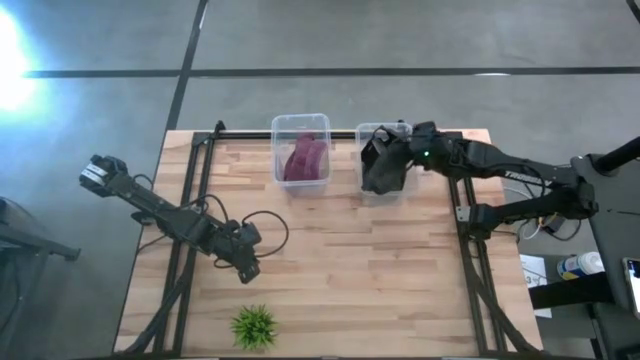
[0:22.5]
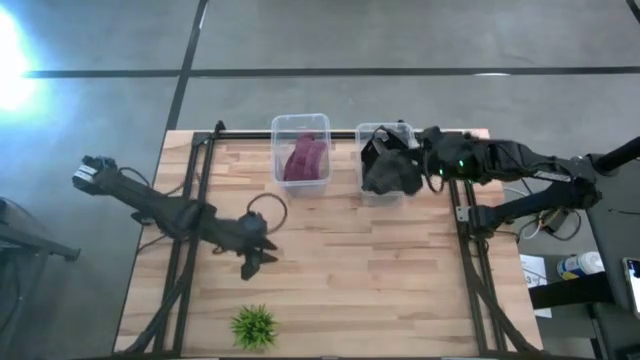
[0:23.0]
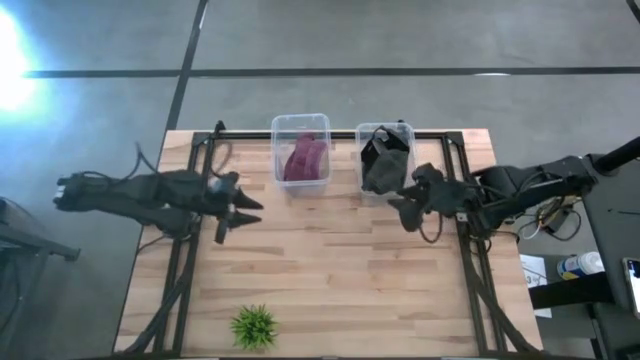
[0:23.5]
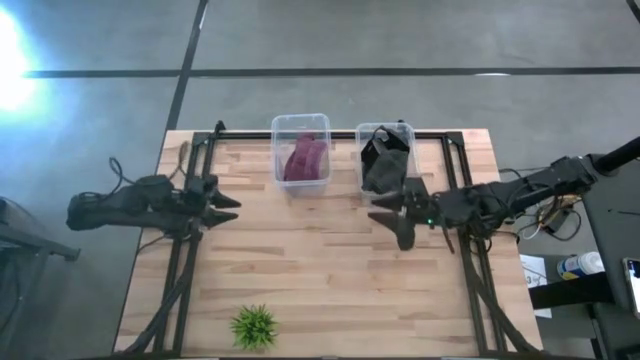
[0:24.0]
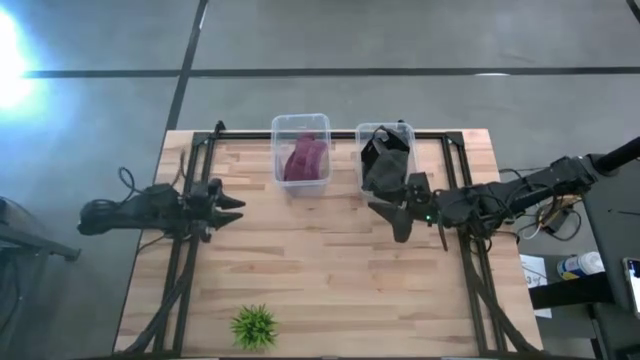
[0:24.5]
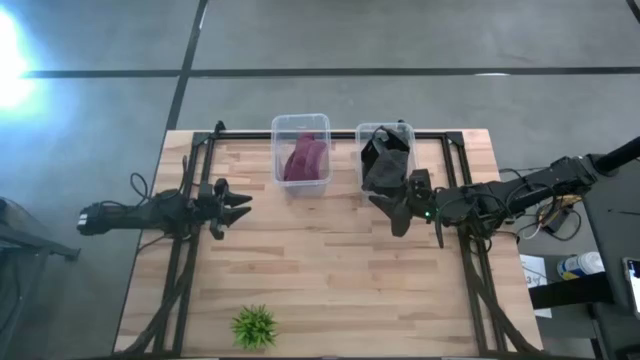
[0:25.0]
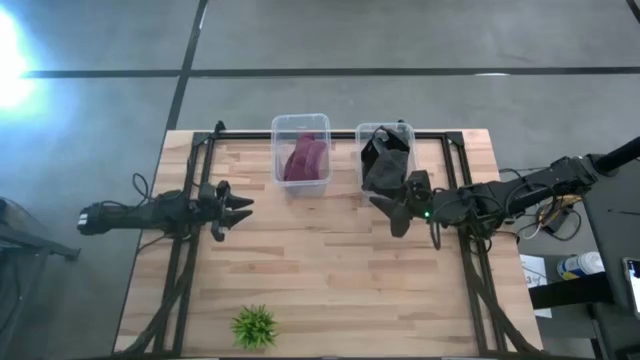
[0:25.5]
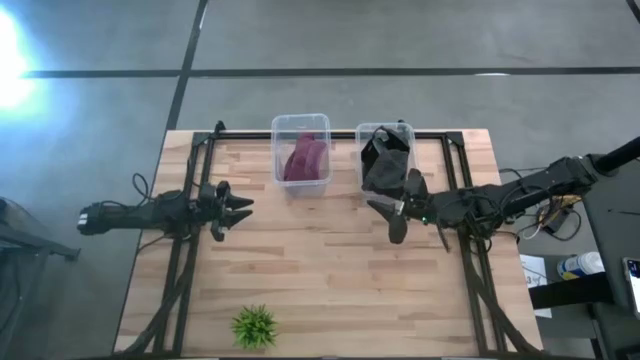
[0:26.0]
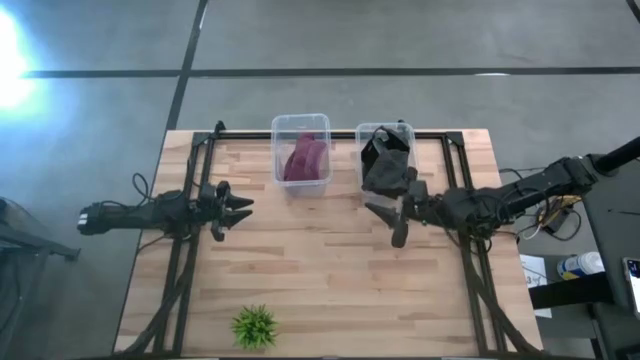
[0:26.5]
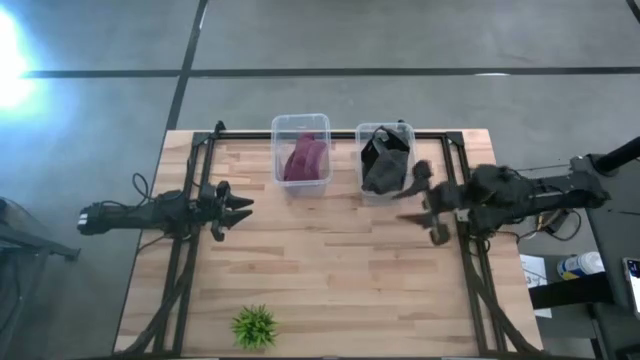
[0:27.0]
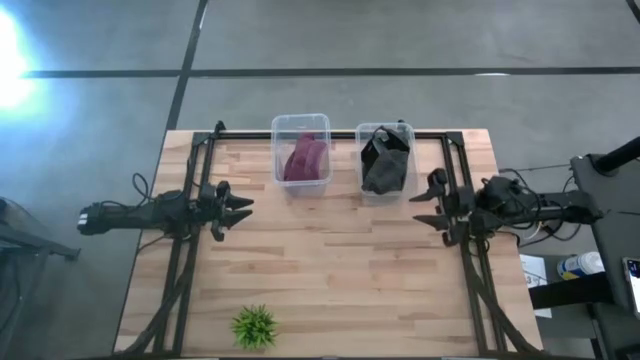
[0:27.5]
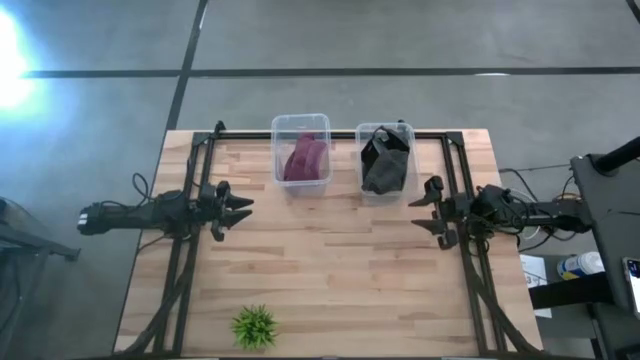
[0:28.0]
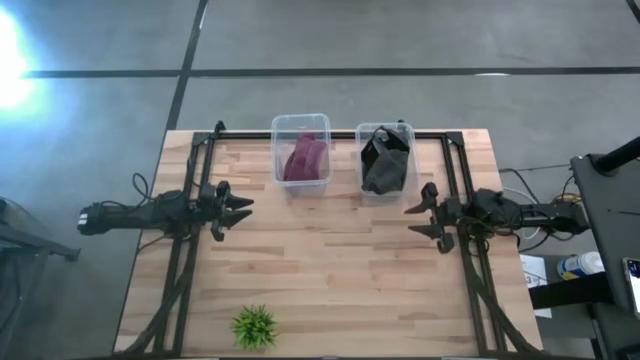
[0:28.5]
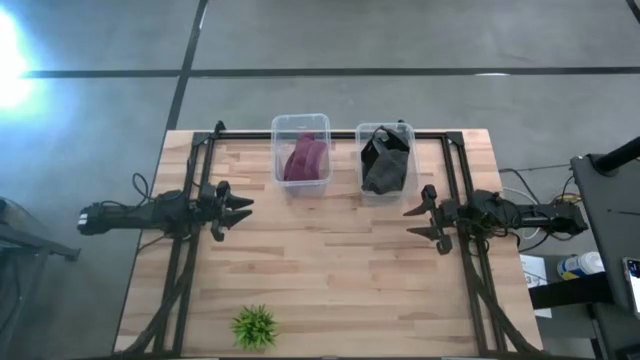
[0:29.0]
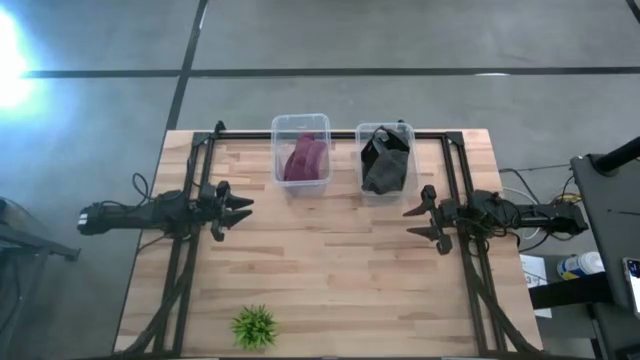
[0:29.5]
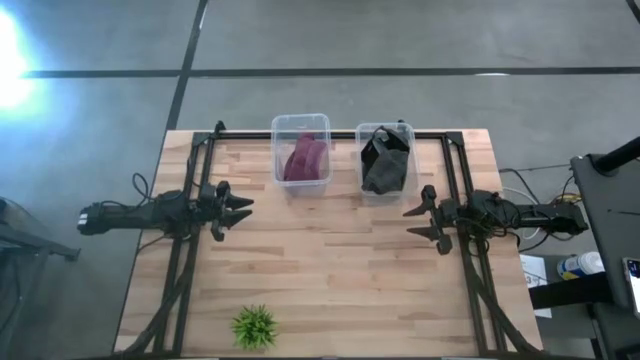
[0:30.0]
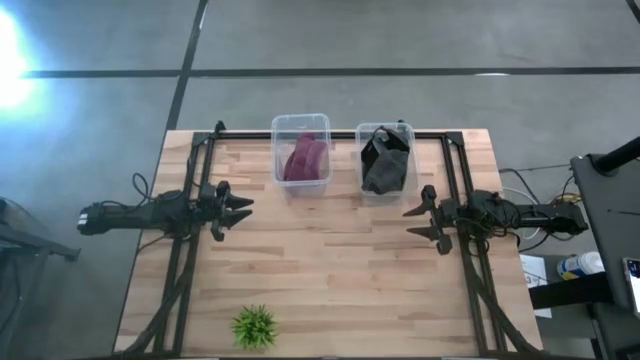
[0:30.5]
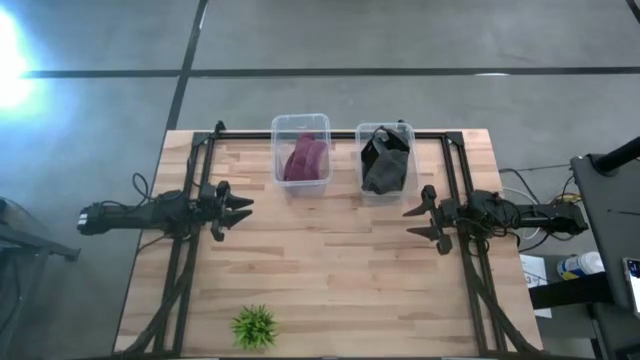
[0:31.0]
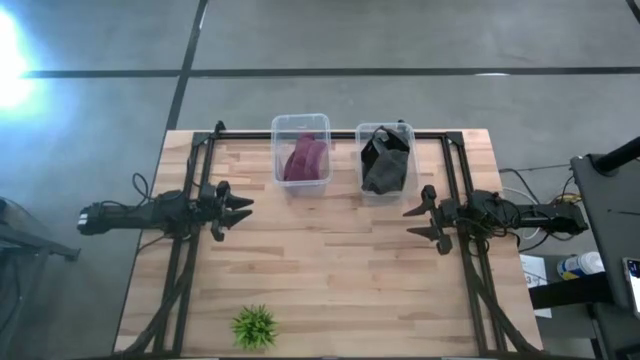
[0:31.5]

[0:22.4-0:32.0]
Task: Pick & Place hat
Return to Home Position

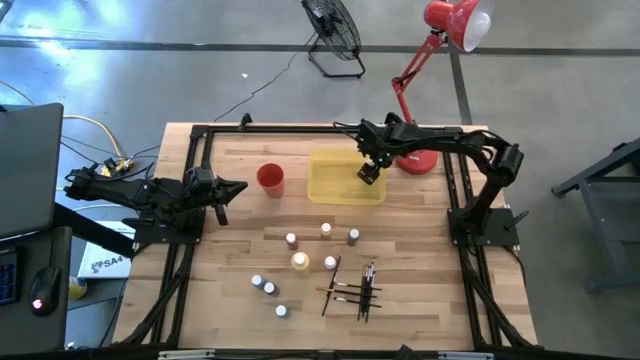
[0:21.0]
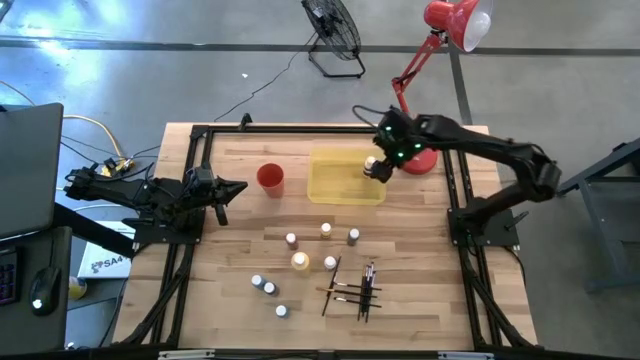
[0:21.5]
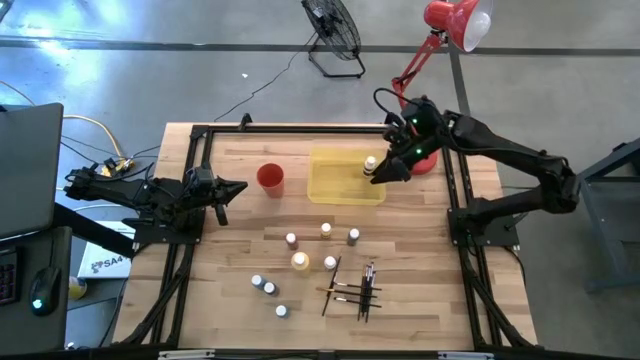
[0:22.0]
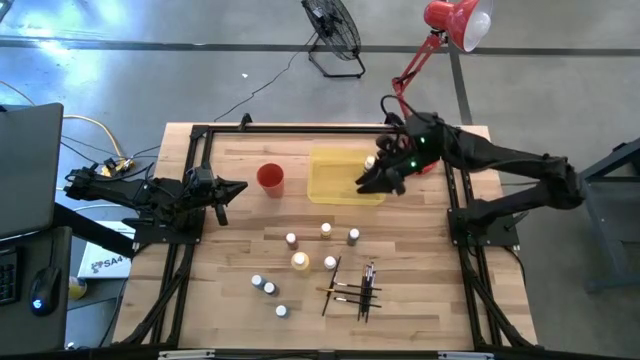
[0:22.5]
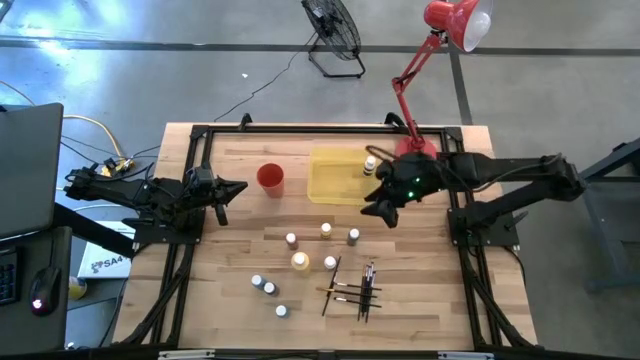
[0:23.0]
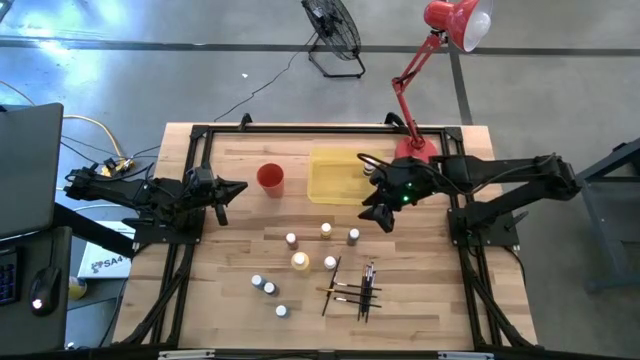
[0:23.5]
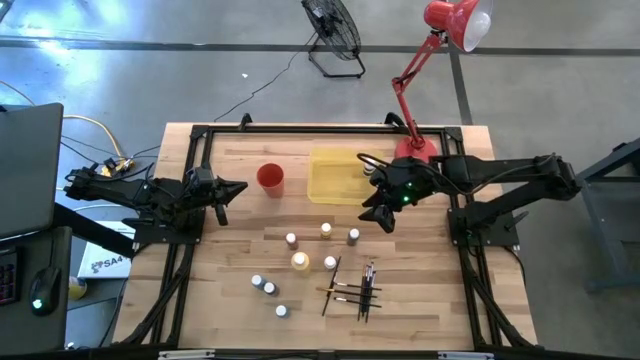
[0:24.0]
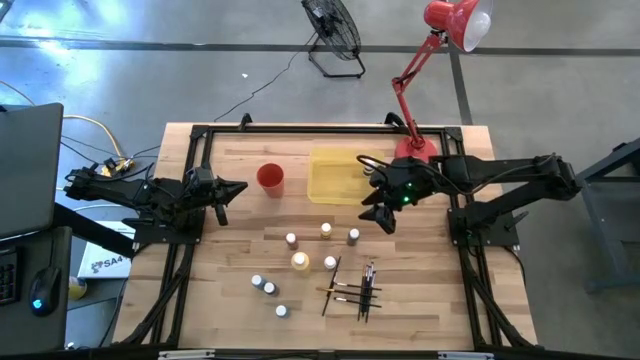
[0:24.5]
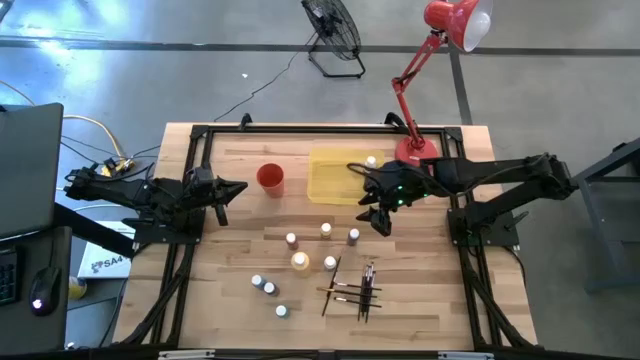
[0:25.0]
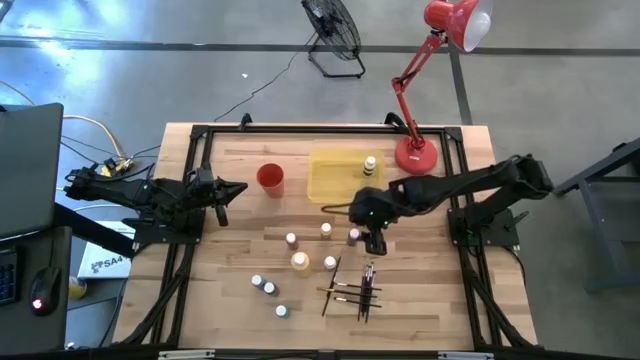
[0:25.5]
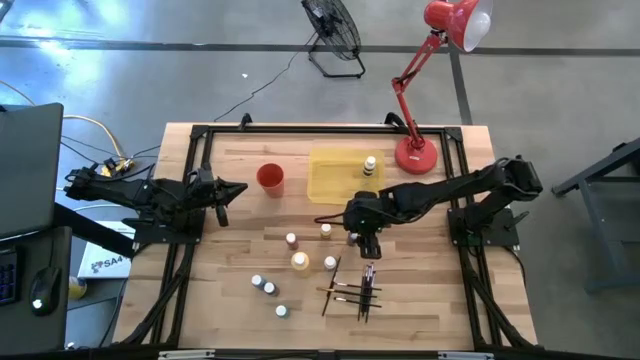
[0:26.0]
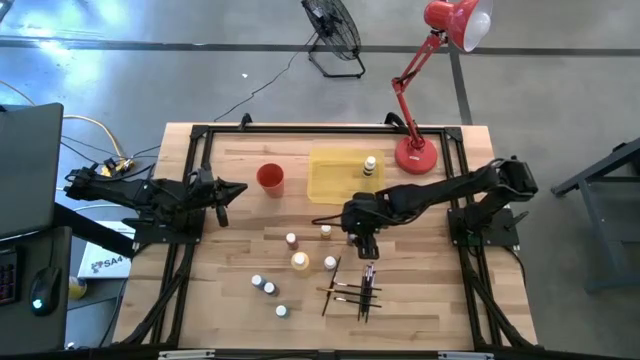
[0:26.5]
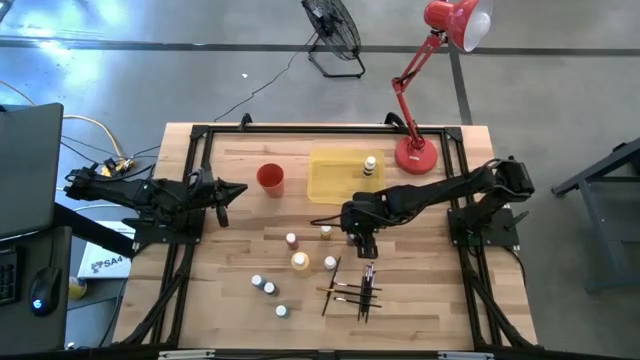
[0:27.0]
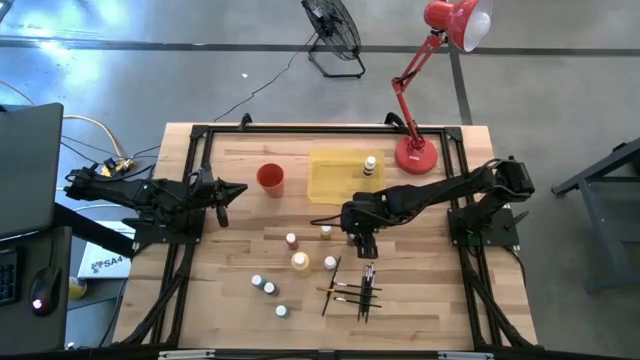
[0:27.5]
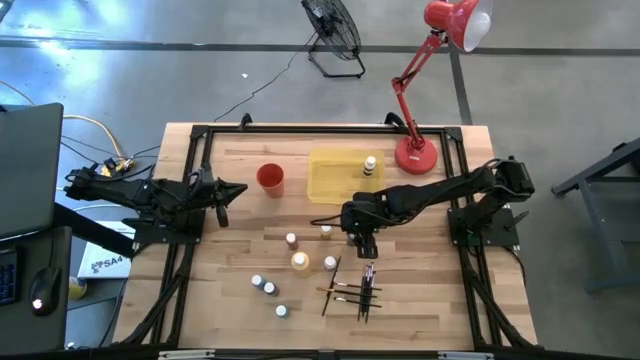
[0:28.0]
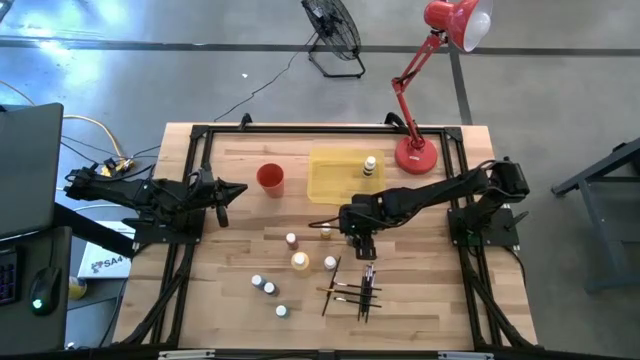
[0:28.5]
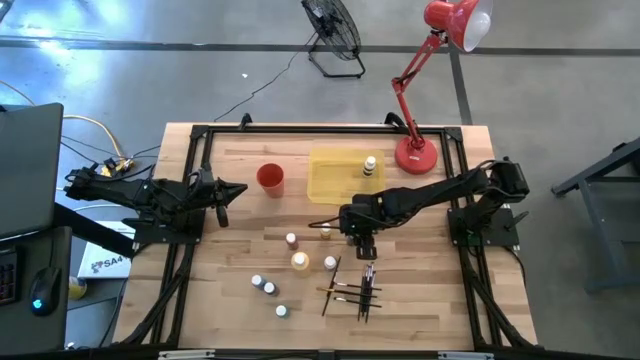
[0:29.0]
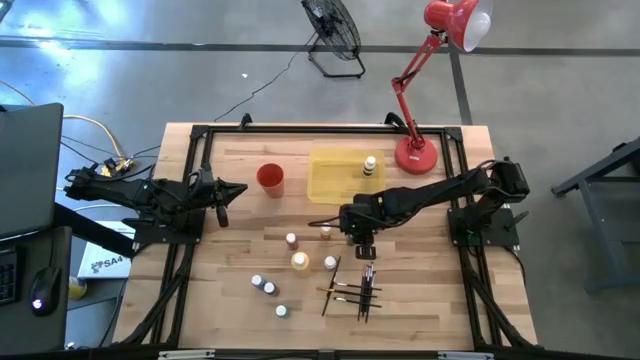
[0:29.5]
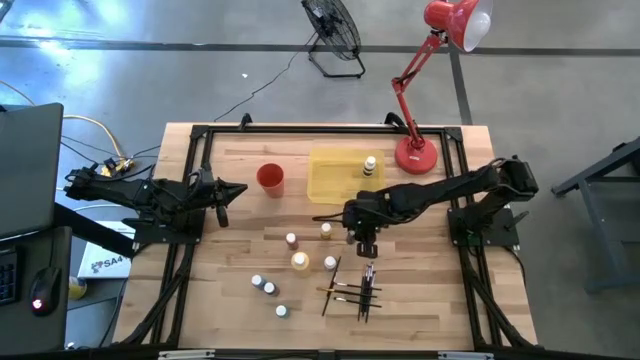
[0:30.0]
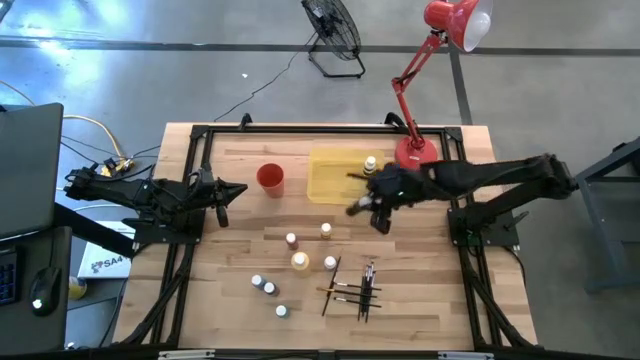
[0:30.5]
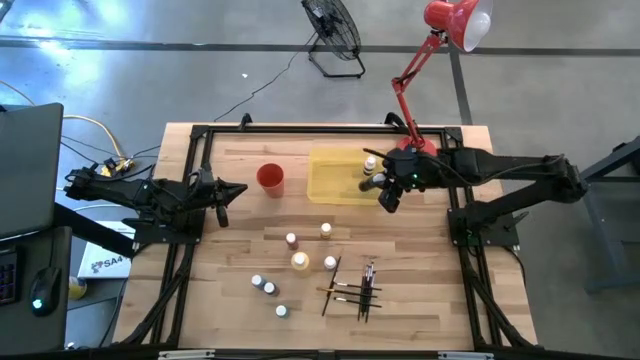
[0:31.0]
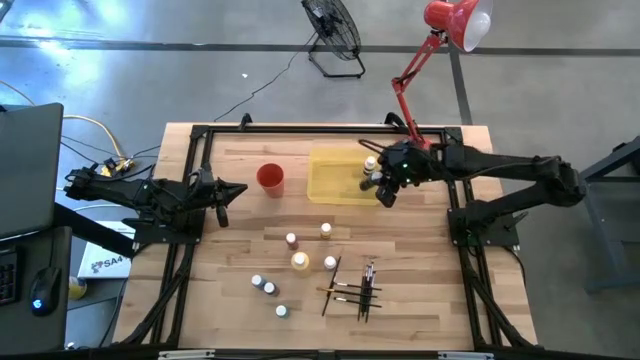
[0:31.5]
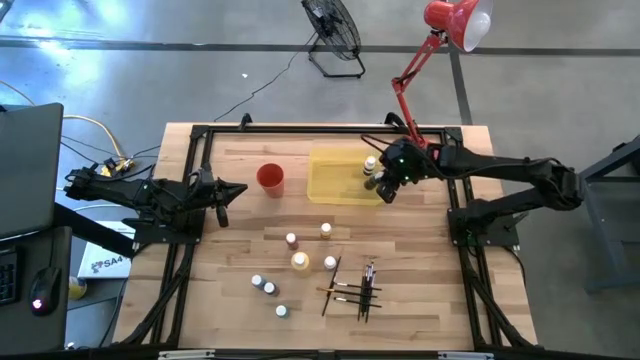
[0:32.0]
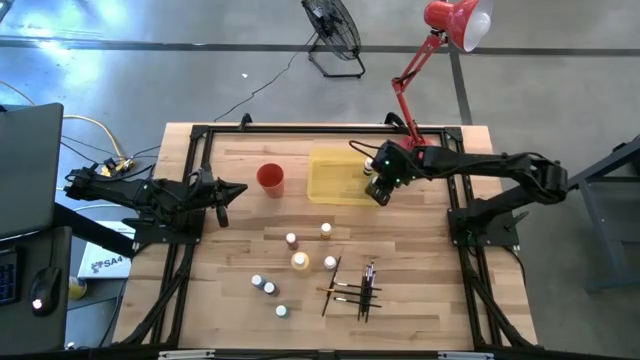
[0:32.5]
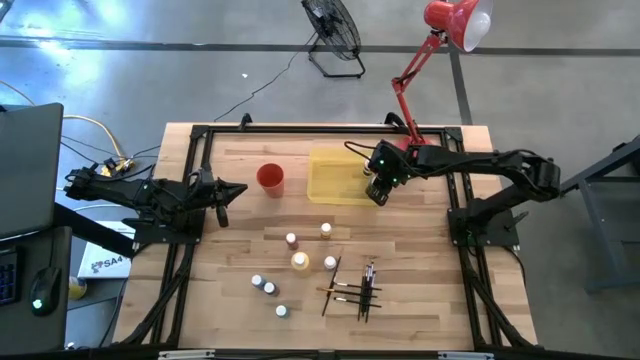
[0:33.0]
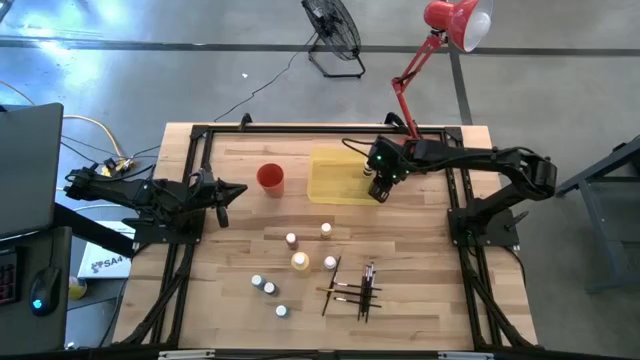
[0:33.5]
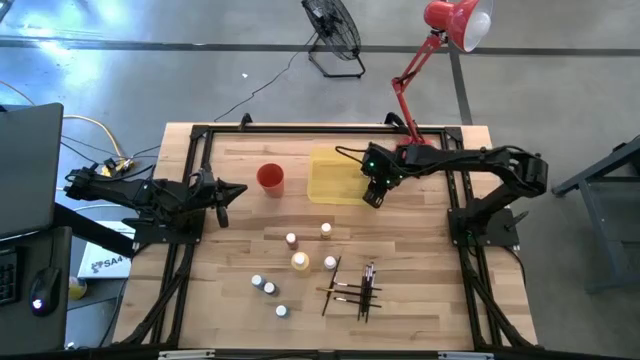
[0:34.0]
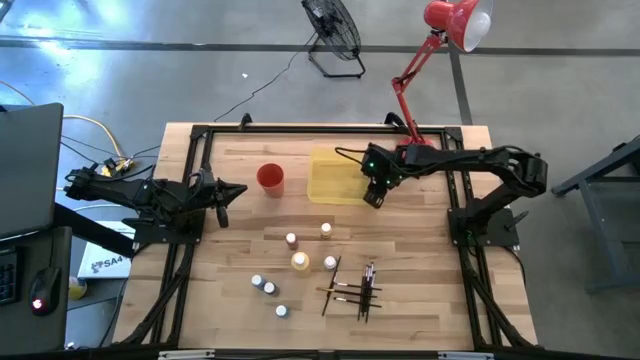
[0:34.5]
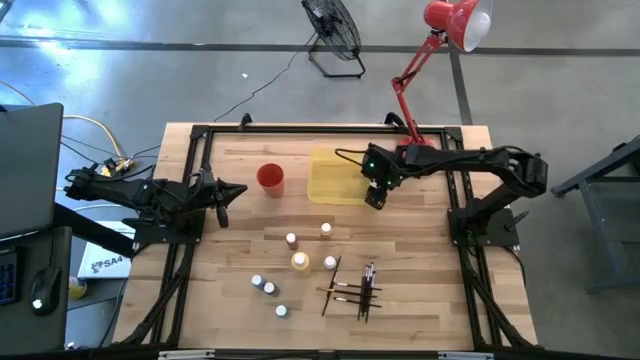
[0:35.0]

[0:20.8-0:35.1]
Task: Pick & Place Paint Supplies
Put the green paint bottle into the yellow bin
